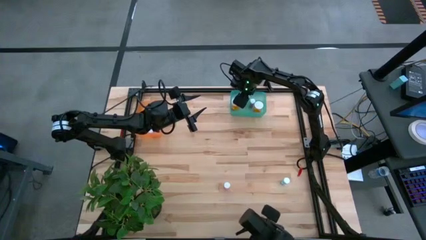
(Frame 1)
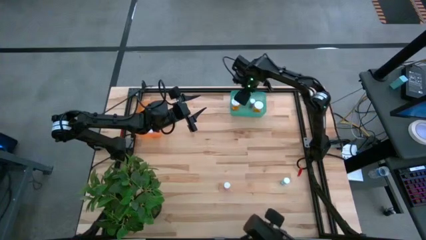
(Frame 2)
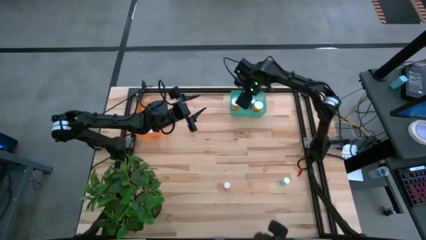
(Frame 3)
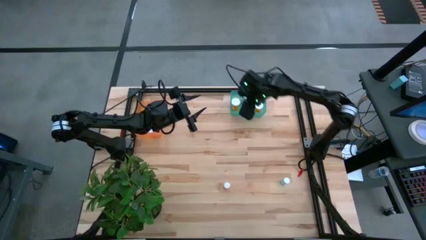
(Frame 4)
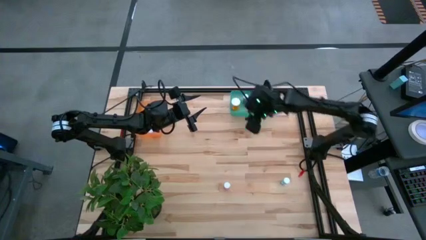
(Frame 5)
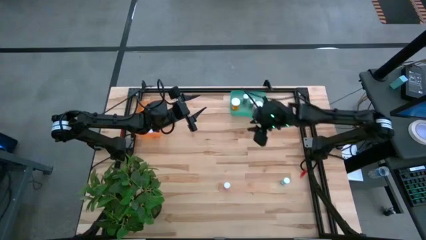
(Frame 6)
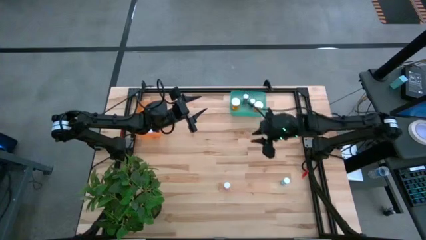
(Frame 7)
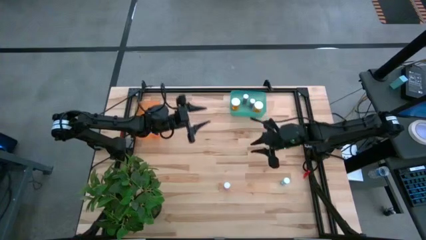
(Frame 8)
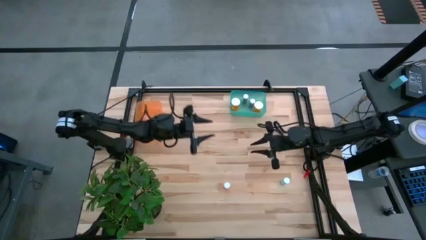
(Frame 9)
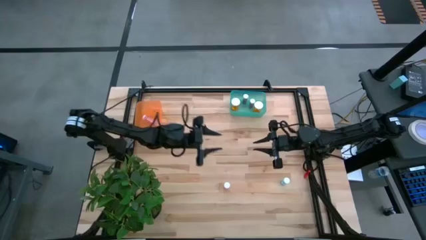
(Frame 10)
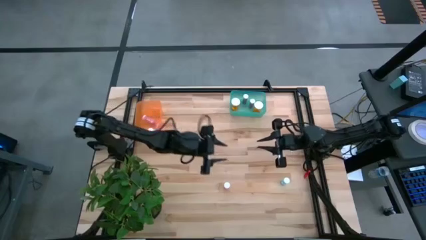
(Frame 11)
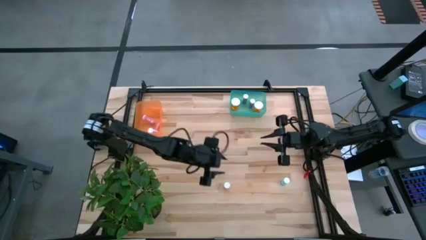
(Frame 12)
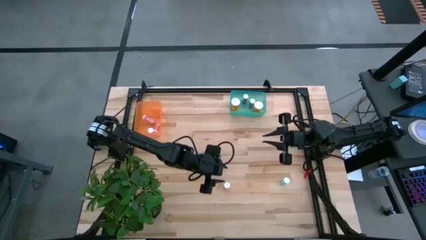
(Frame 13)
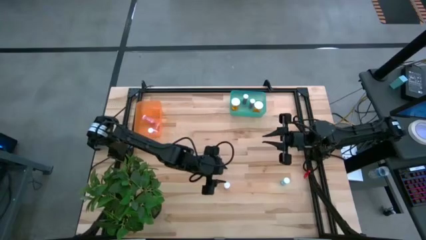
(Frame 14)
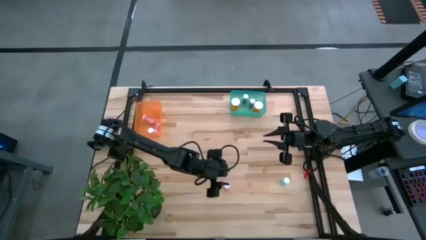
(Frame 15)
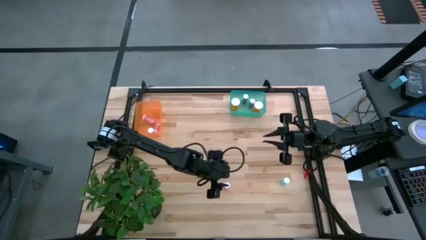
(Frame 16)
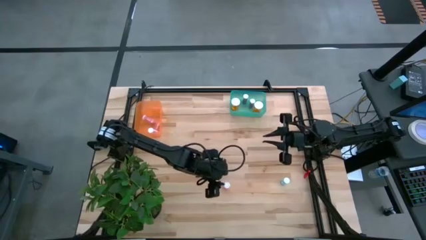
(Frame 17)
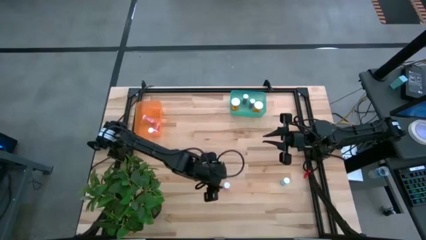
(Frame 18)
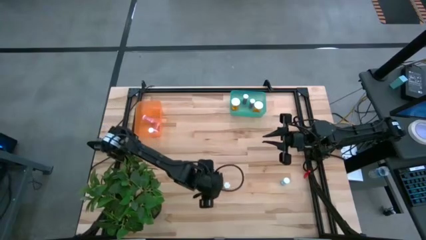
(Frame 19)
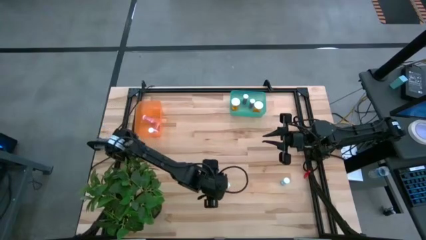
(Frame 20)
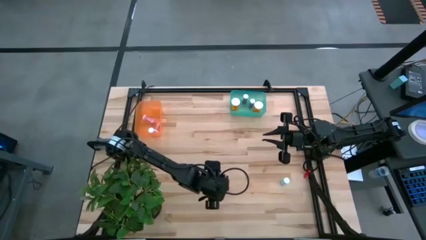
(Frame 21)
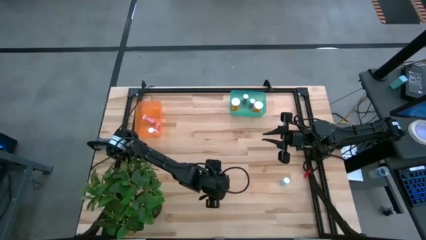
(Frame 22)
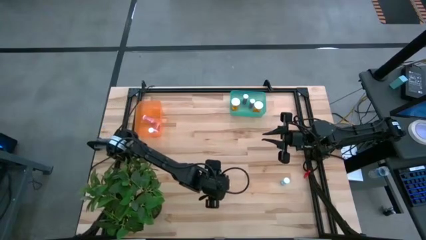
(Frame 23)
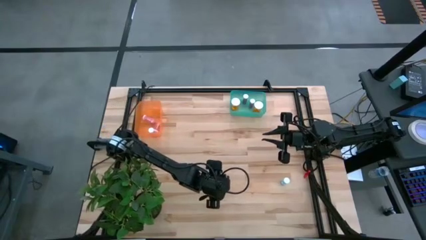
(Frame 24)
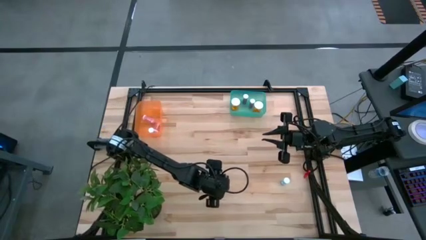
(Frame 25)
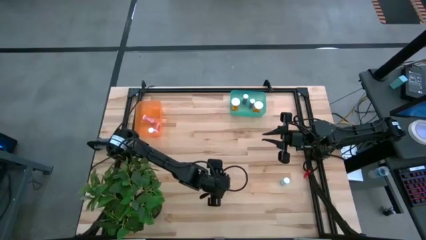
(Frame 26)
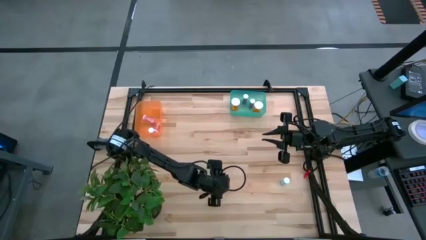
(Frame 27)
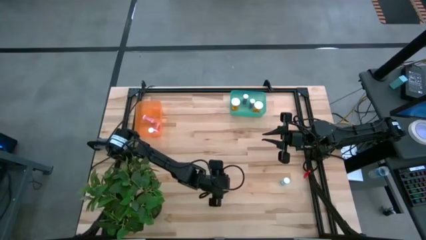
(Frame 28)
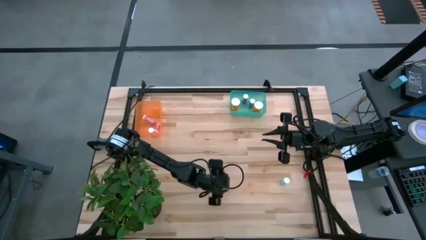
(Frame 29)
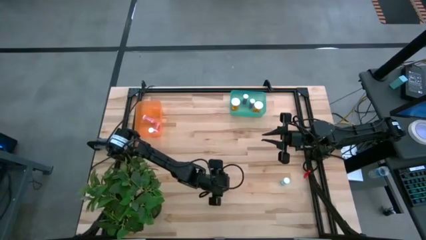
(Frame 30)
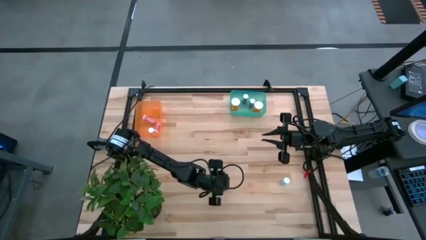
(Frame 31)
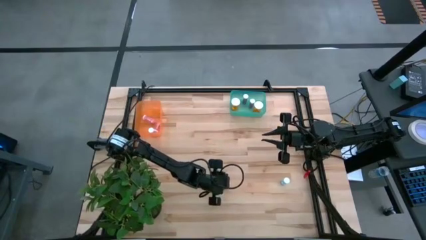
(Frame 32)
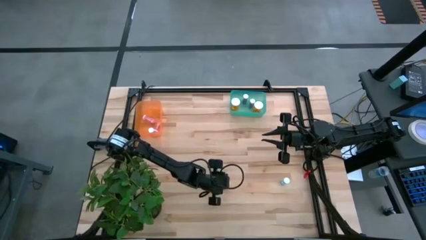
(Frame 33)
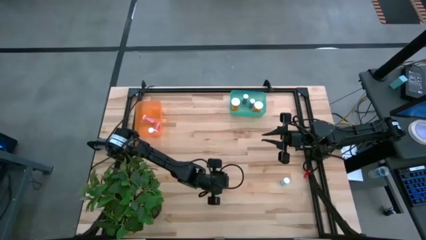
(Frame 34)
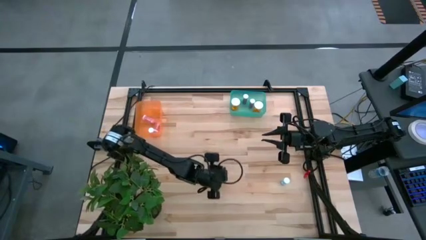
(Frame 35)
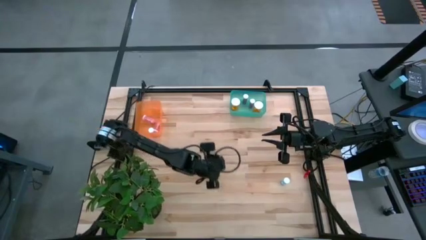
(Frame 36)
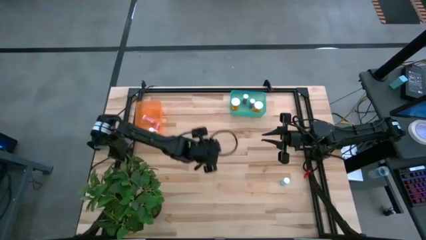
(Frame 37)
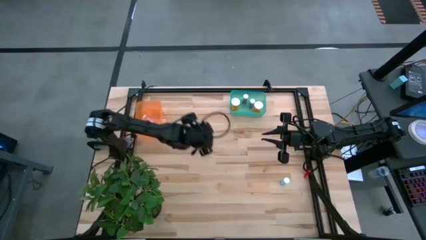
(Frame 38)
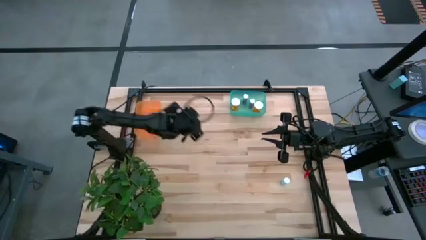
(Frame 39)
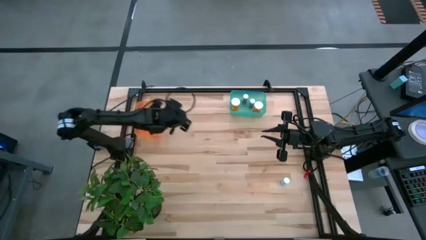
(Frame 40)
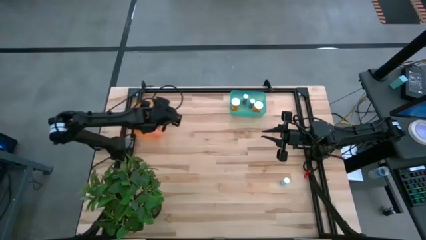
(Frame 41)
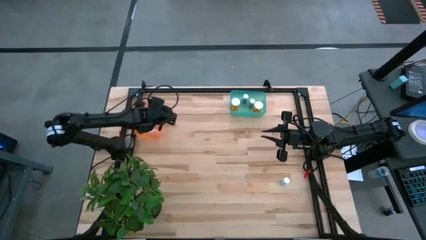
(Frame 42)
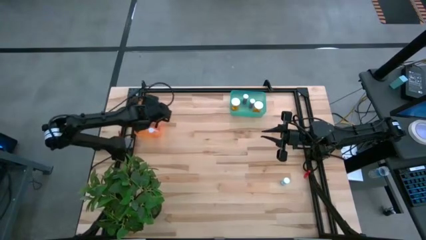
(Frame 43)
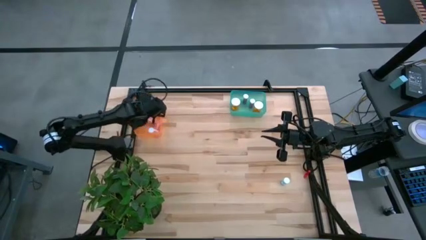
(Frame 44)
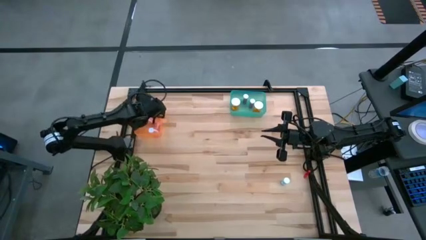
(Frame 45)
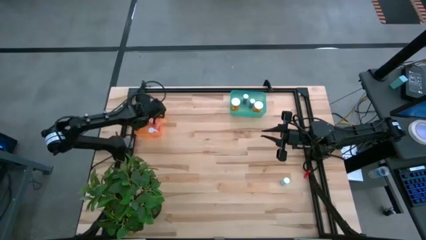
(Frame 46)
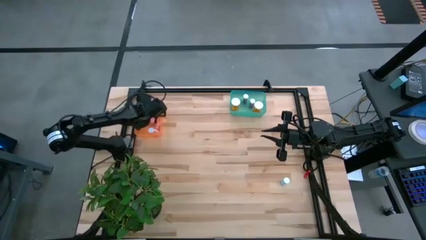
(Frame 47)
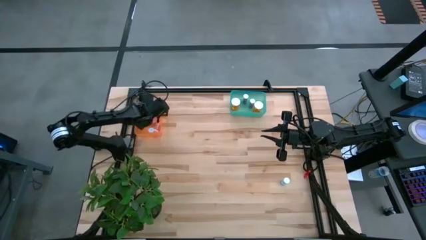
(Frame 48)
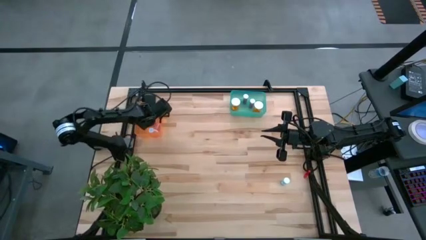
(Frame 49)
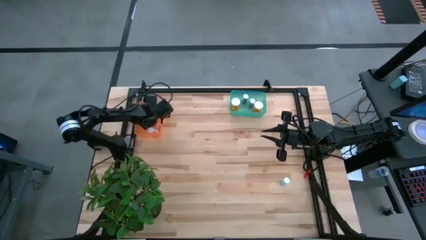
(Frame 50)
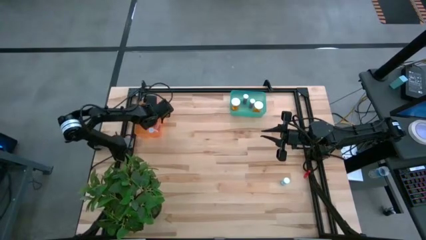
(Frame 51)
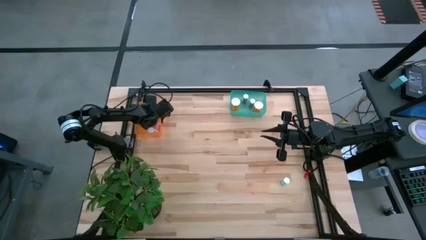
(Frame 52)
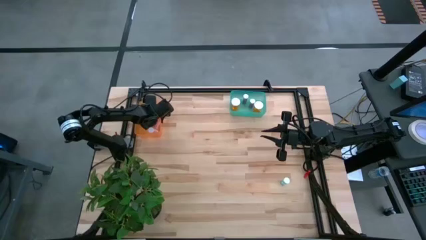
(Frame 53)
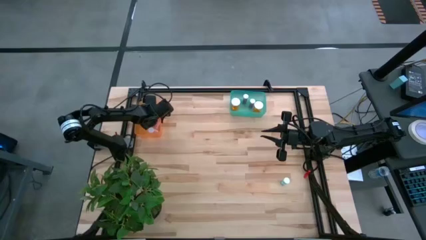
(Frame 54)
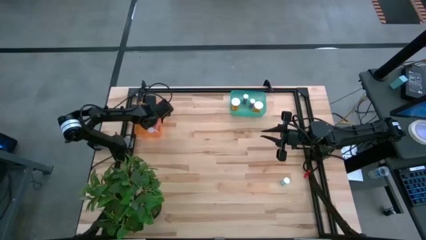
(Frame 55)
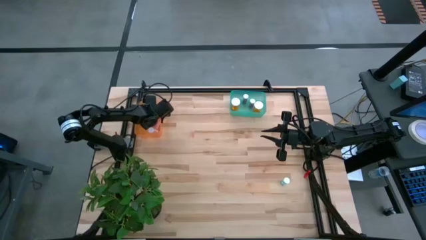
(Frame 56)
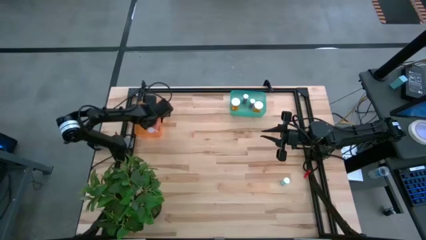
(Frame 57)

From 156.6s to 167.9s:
Task: Pick and place medicine bottles into bin by pill shape (circle, oval)
Put the pink tablet bottle into the orange bin

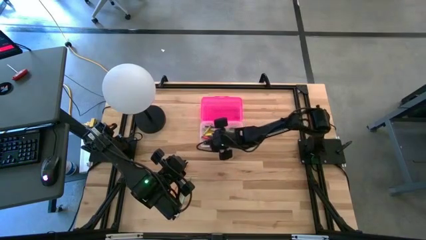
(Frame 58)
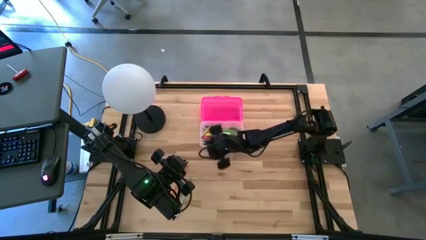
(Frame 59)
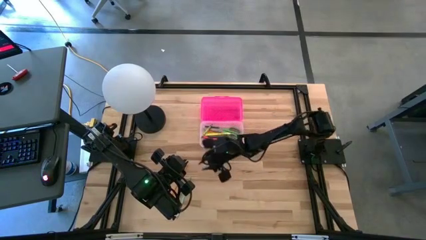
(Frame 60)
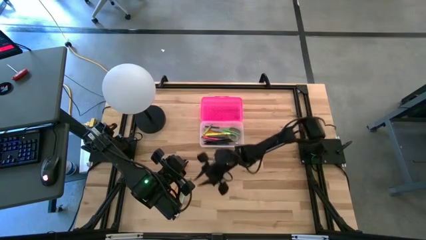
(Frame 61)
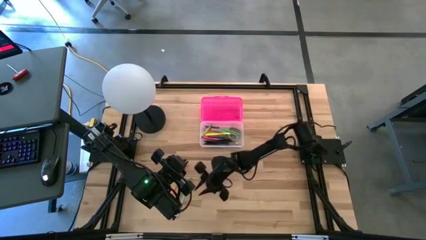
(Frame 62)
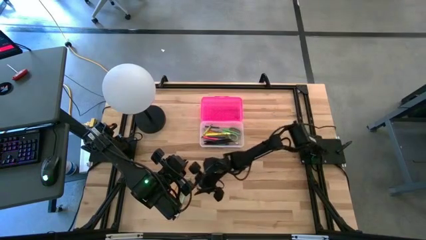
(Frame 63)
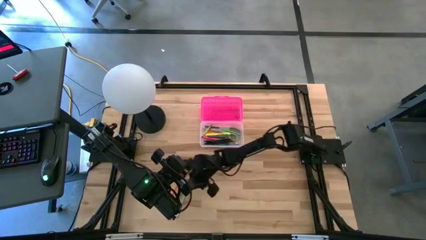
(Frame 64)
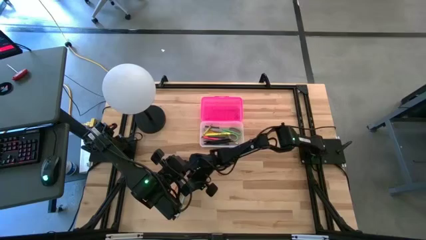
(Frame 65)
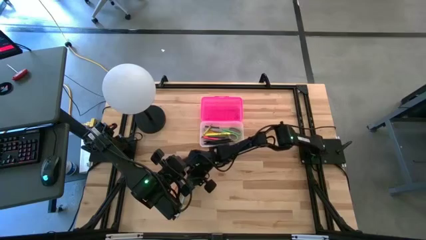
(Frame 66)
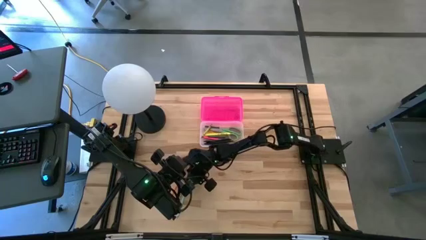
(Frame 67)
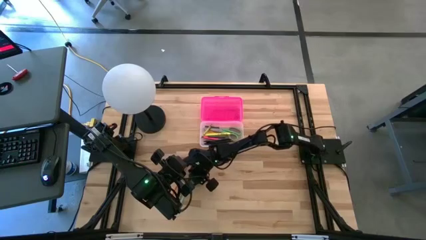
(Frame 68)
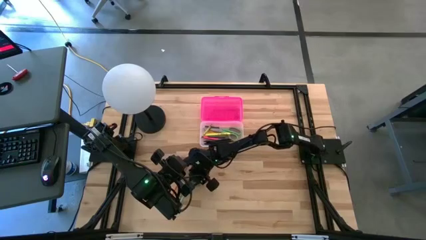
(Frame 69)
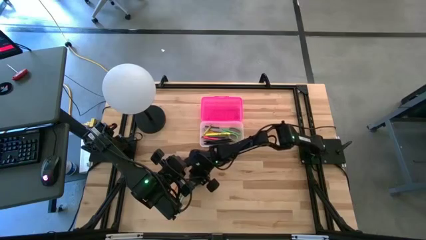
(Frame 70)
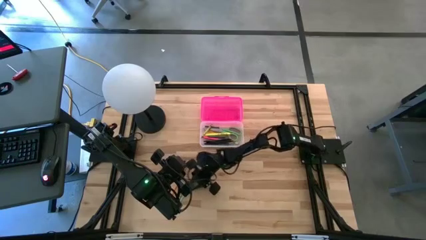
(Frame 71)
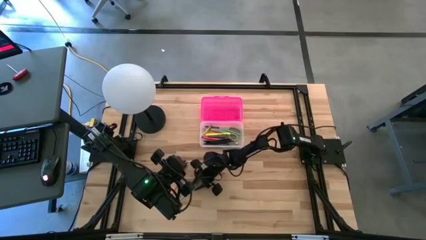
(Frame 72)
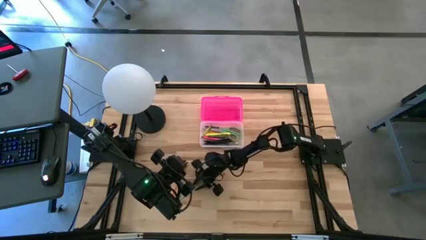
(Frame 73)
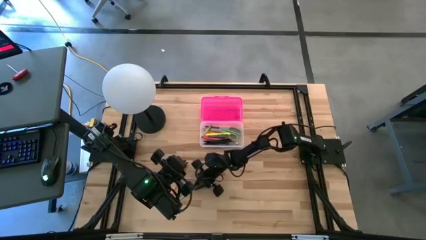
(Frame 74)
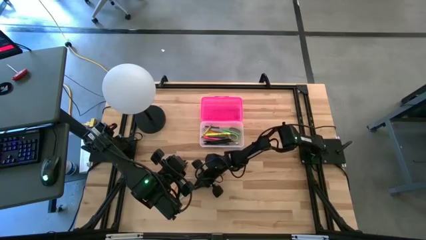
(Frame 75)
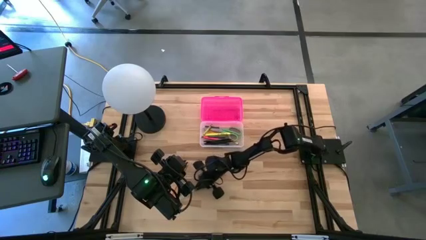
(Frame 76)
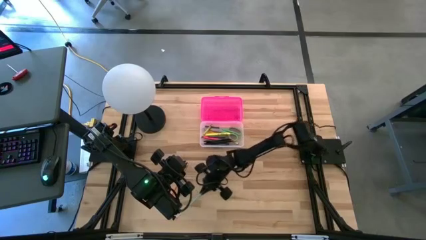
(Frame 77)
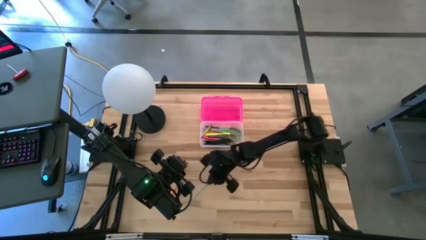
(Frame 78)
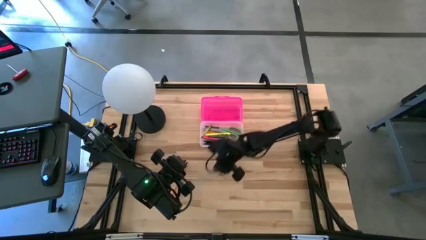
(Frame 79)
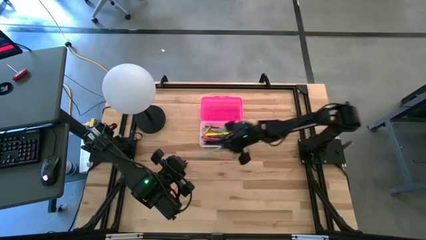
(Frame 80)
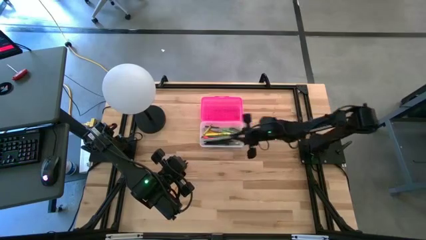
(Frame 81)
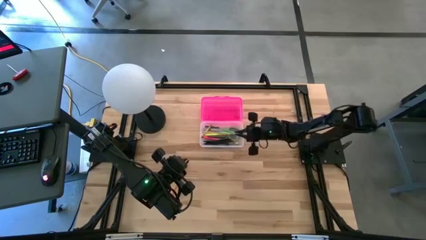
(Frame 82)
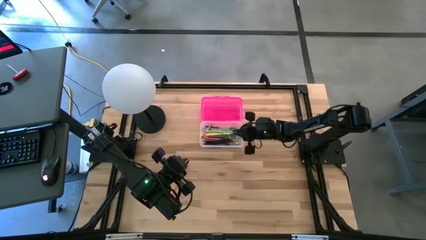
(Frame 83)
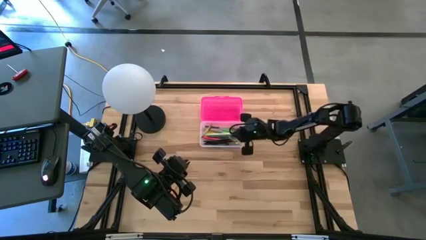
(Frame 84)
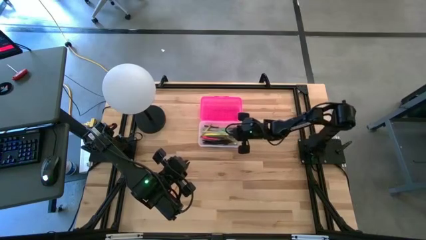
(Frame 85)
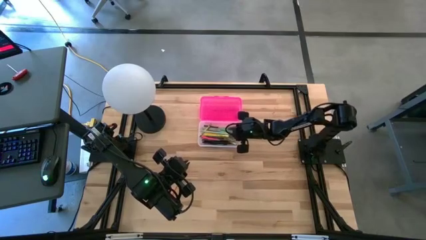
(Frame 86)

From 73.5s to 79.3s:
Task: Pick & place school supplies into a supply box
Put the blue pencil into the pink supply box
